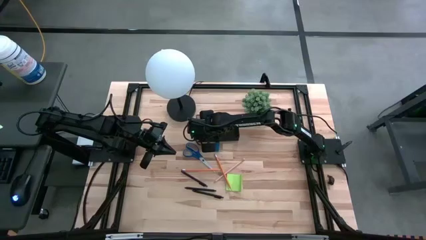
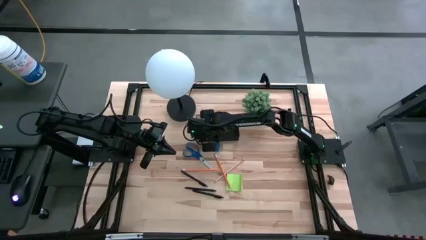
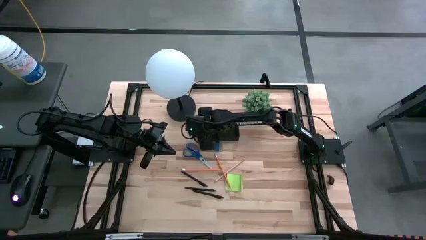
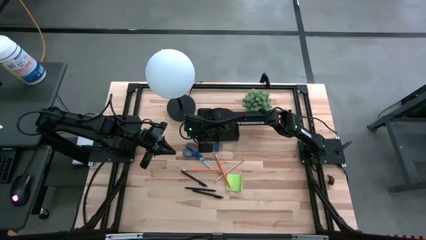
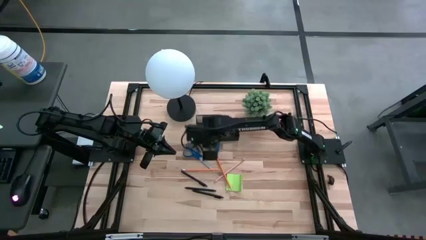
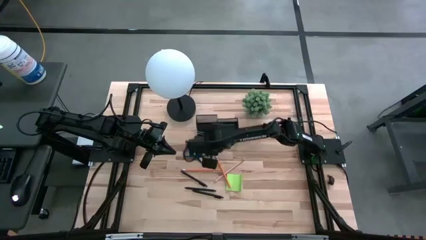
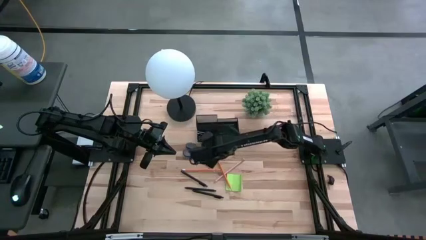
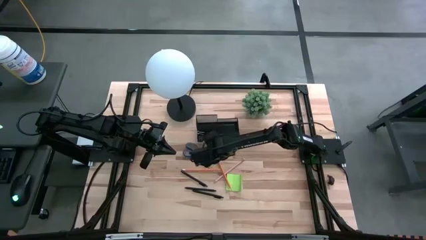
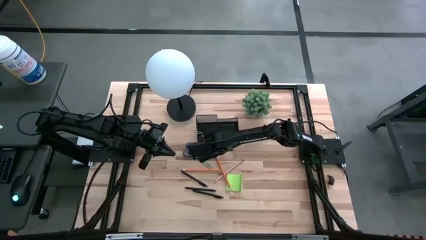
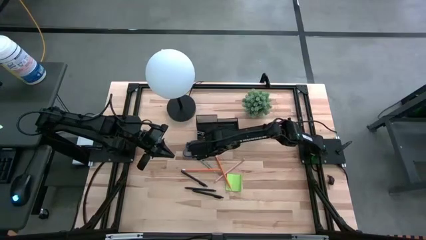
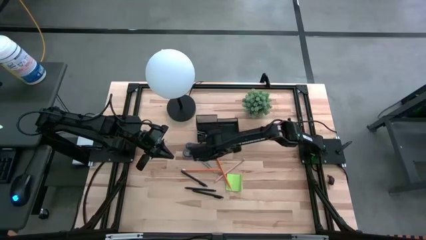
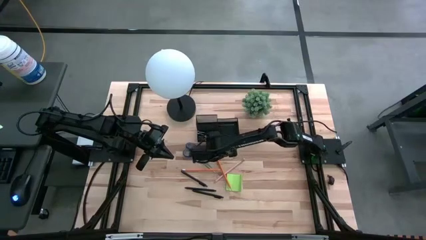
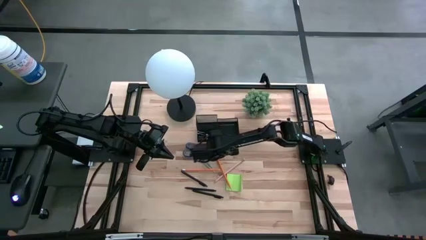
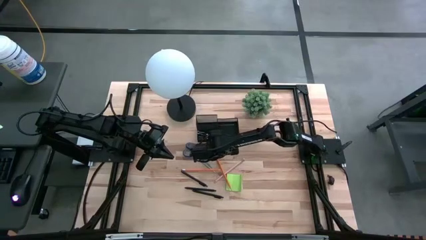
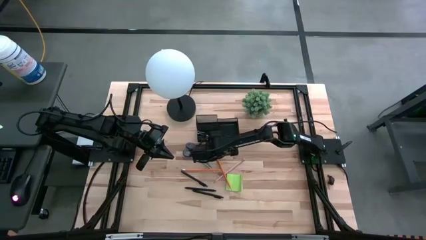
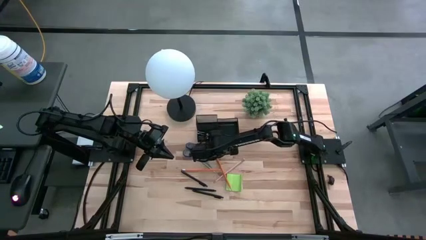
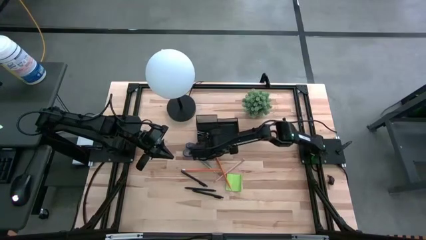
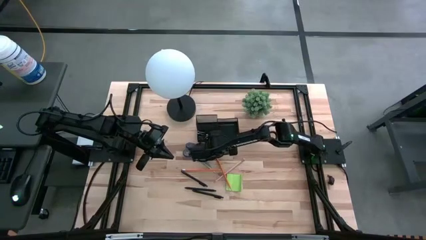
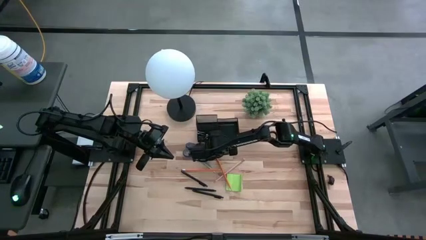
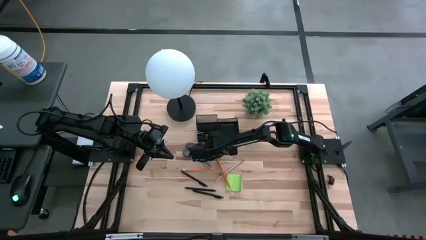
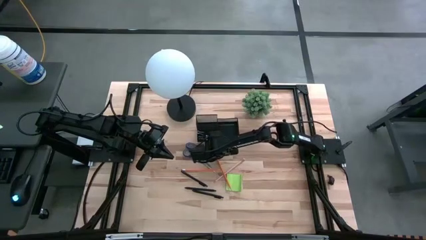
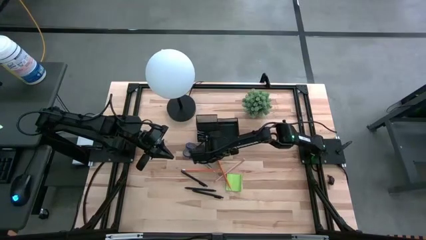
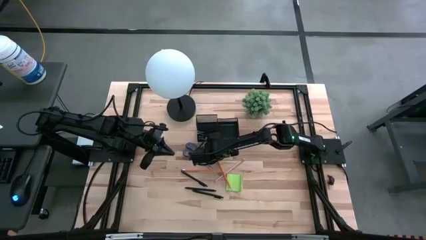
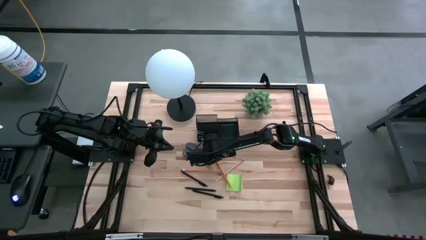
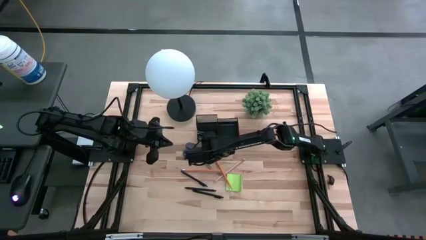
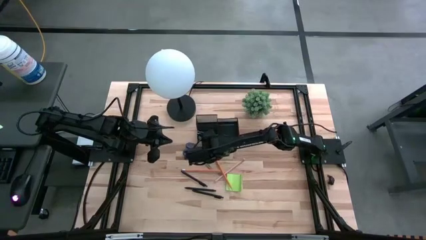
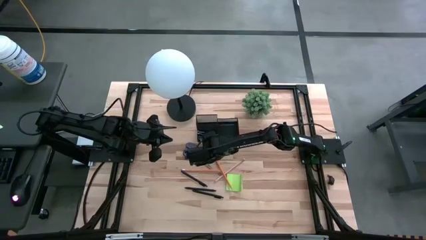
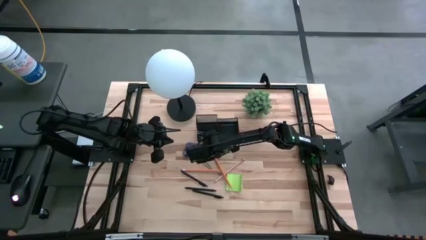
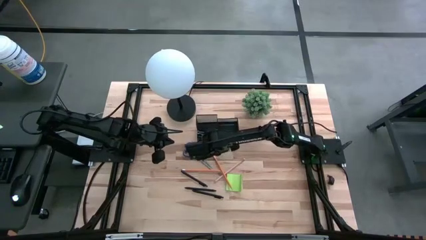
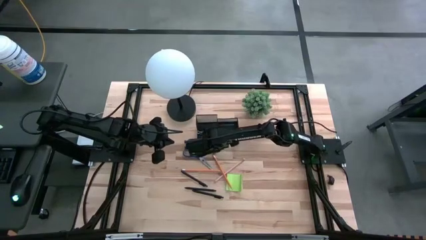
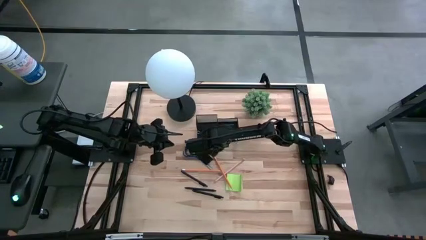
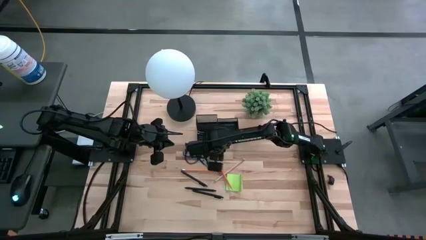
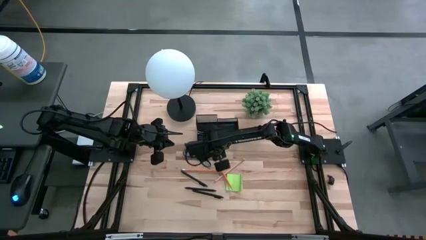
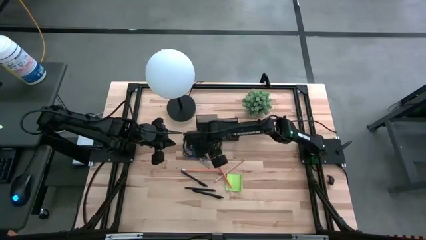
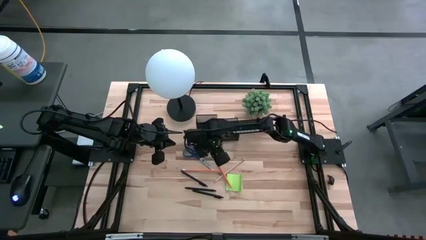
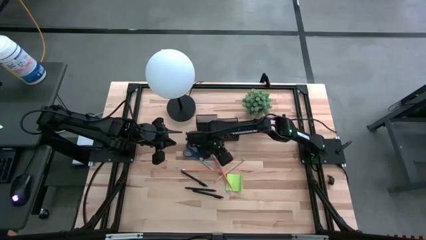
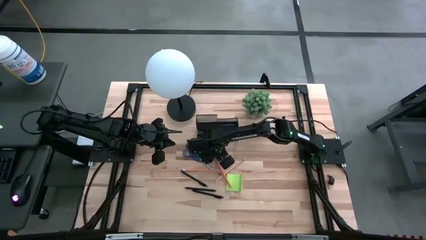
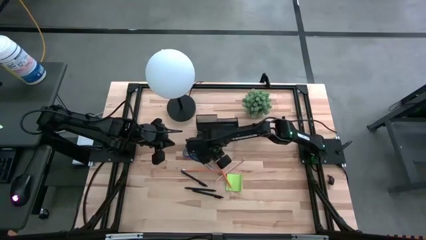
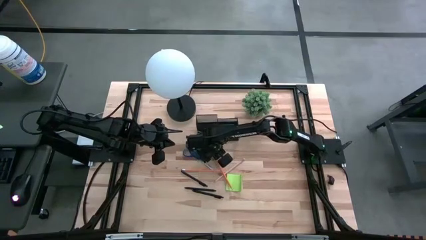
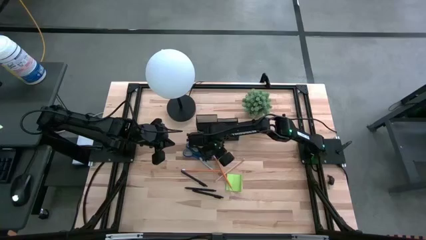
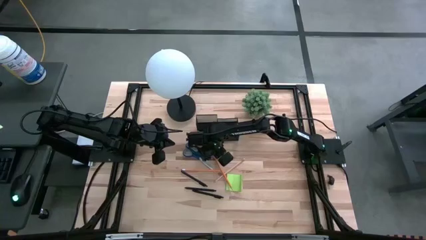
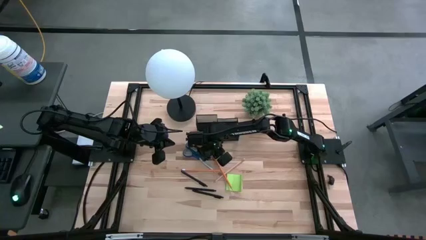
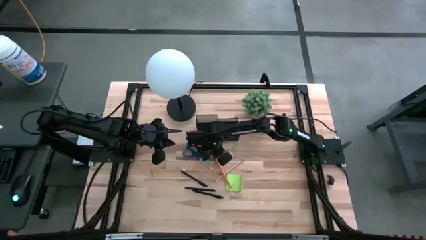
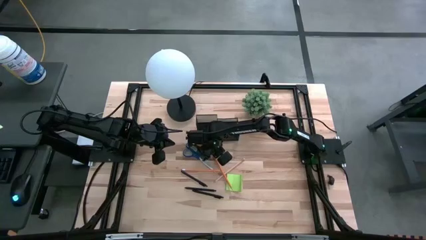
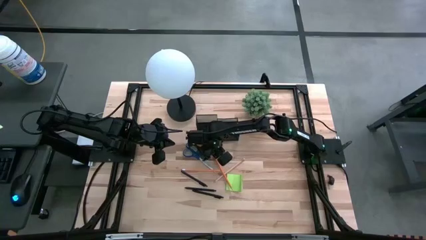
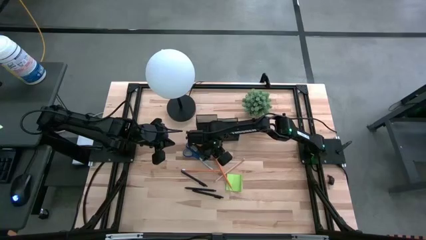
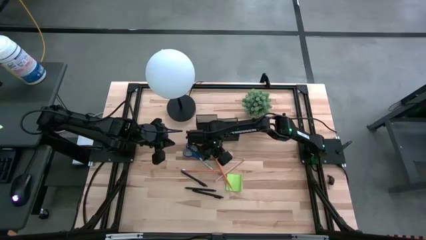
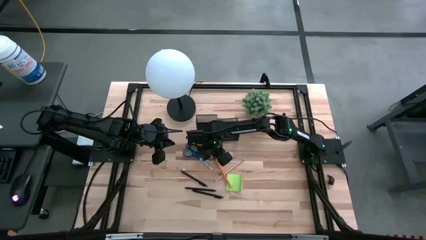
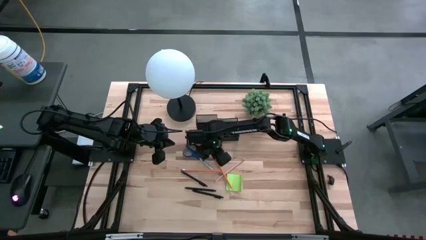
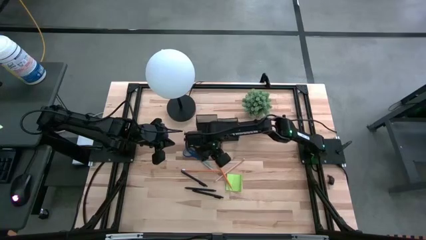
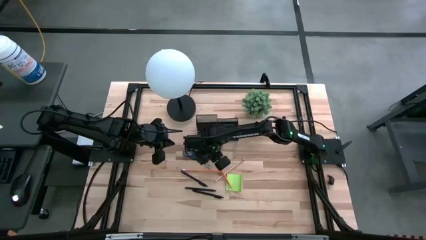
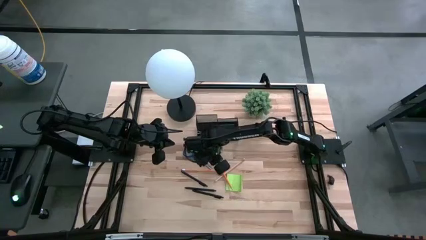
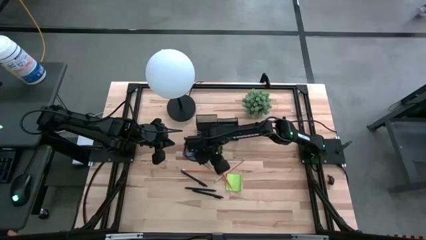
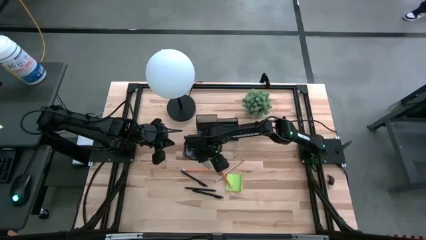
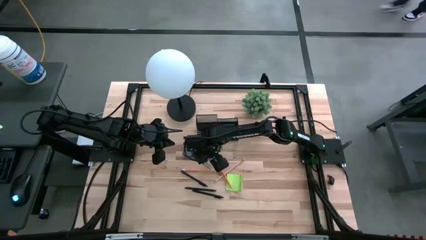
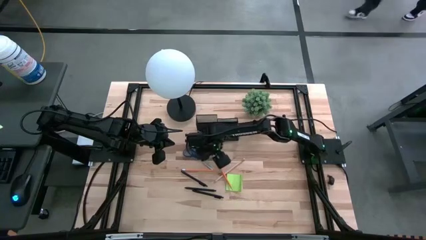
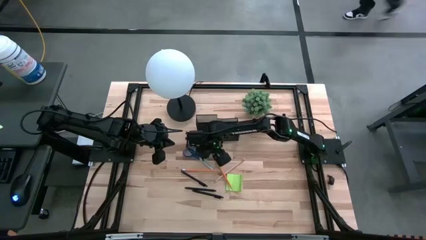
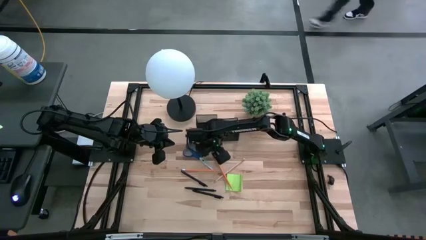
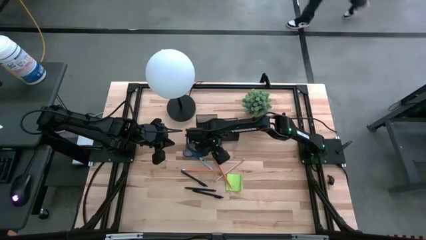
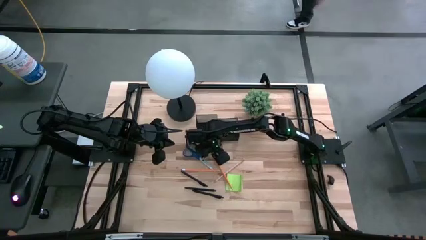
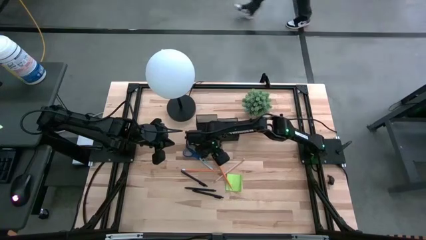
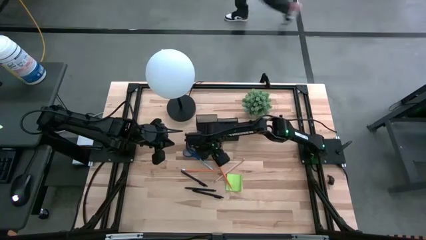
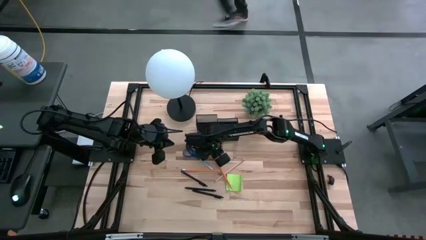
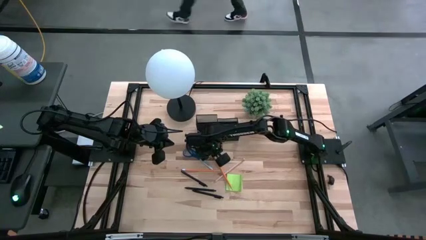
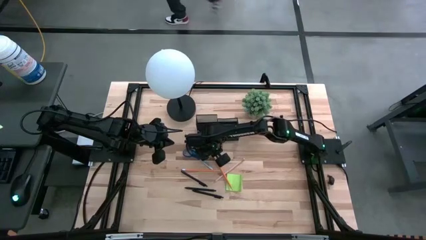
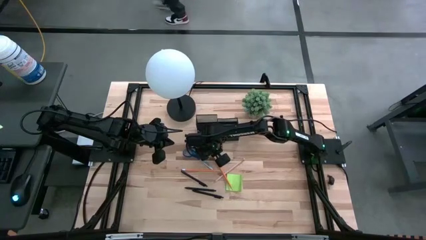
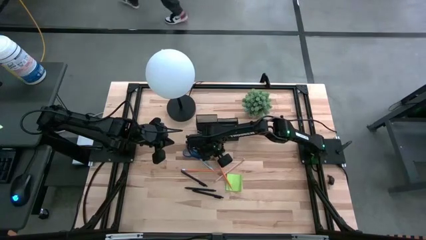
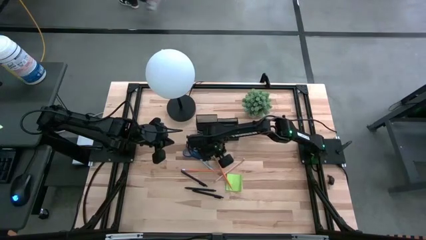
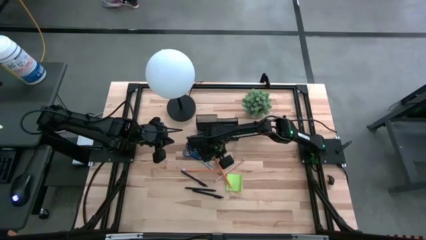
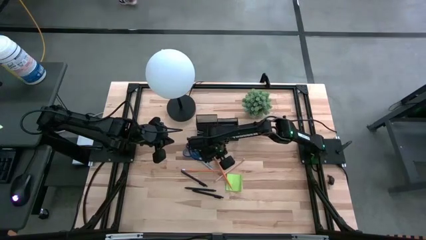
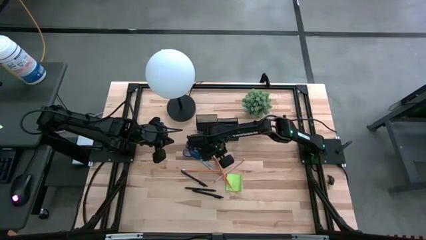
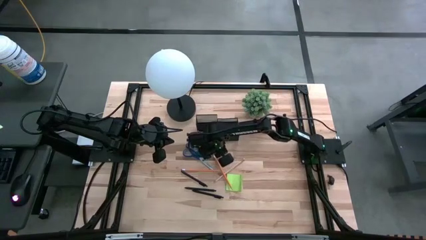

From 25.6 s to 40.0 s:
Task: Pick and place office supplies into organizer
Put the blue eraser into the desk organizer

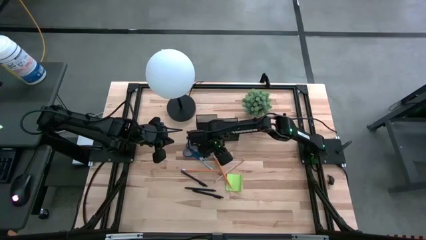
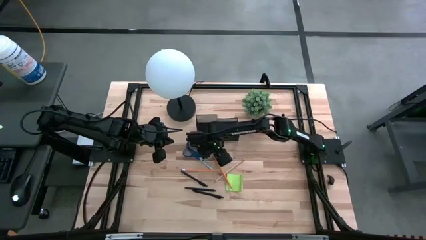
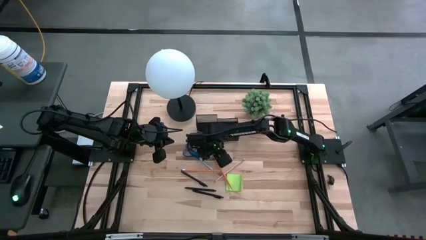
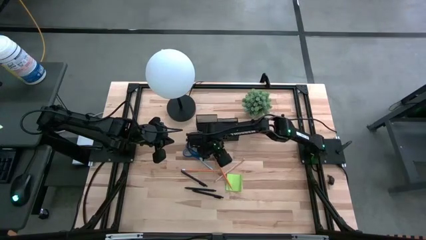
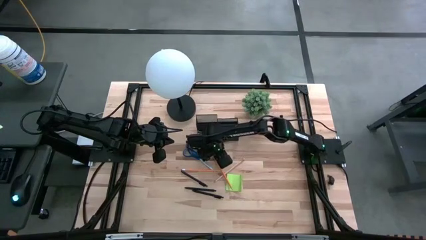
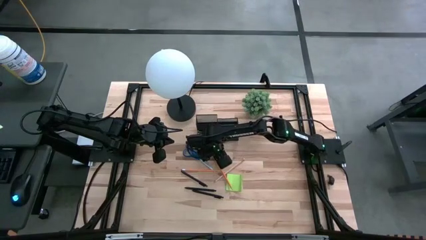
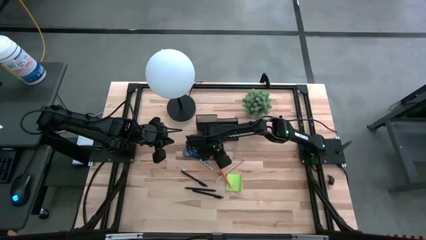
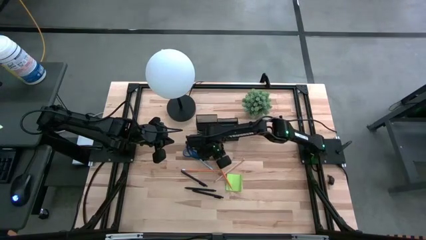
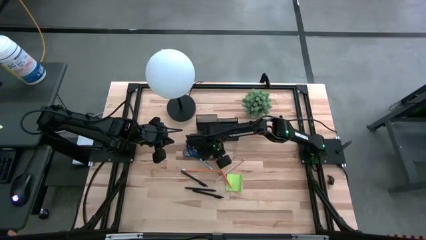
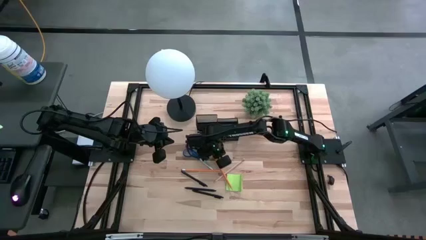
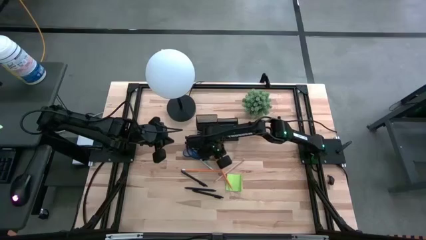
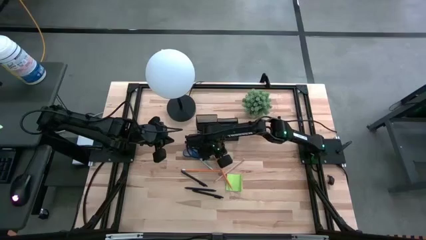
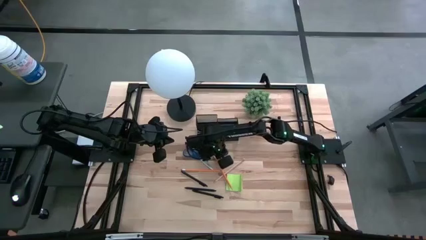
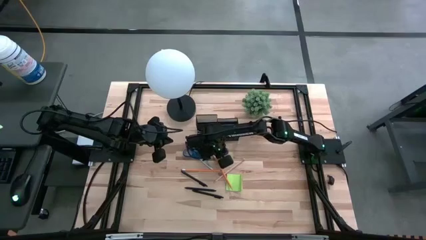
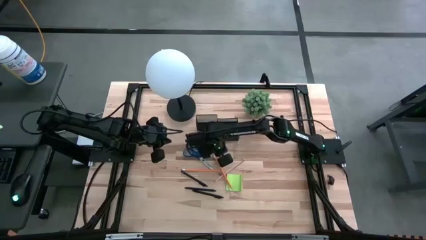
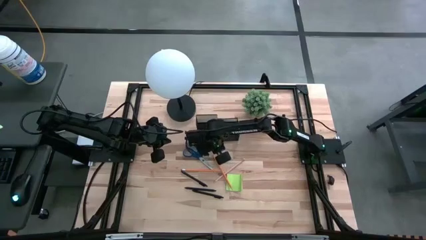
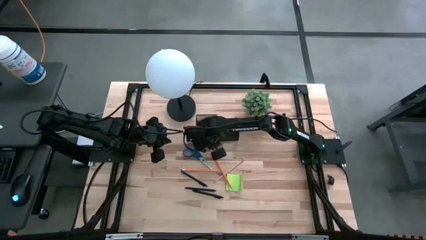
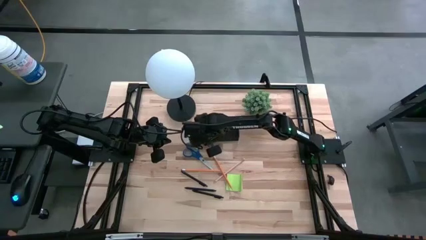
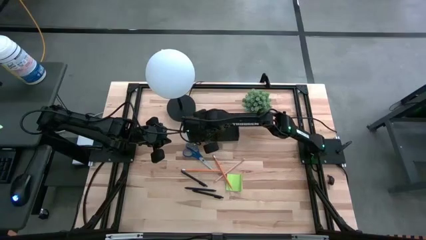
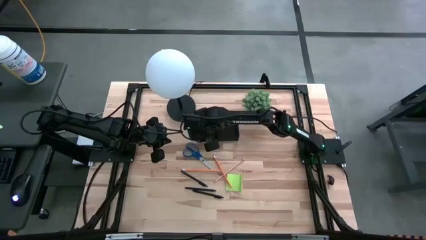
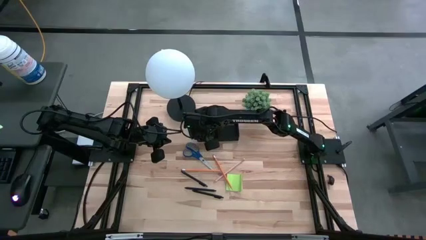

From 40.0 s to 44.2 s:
Put the blue eraser into the desk organizer
